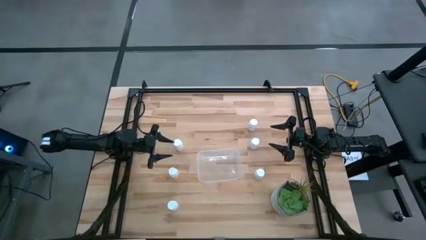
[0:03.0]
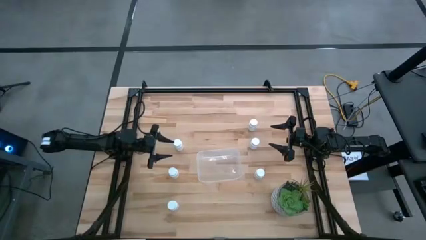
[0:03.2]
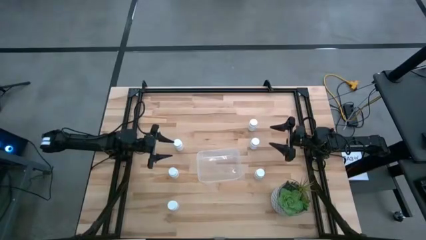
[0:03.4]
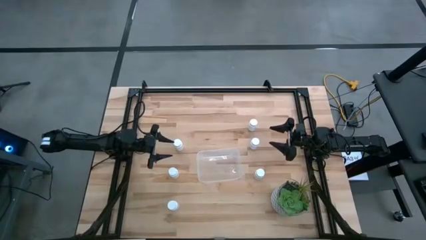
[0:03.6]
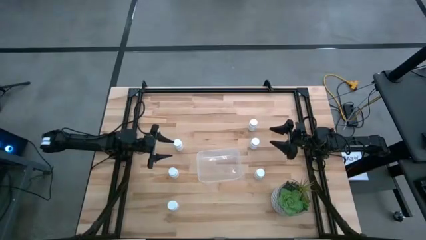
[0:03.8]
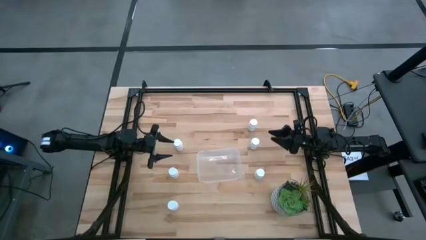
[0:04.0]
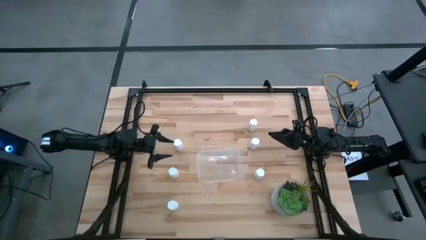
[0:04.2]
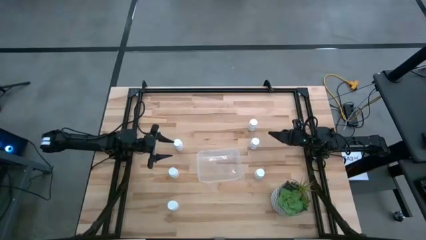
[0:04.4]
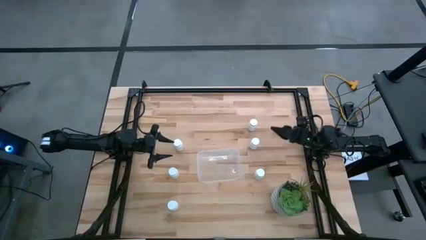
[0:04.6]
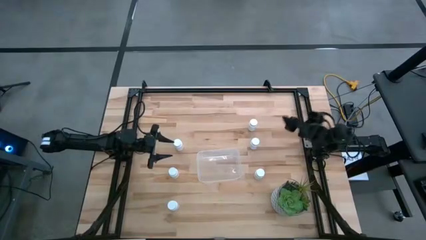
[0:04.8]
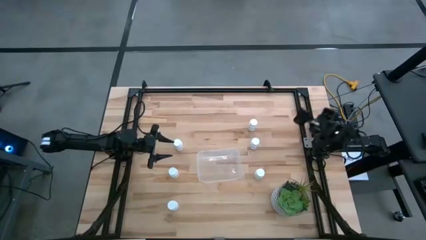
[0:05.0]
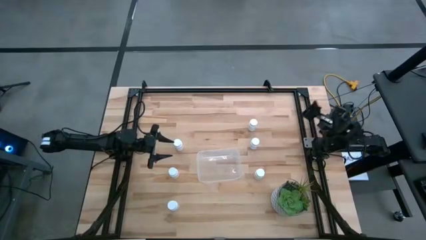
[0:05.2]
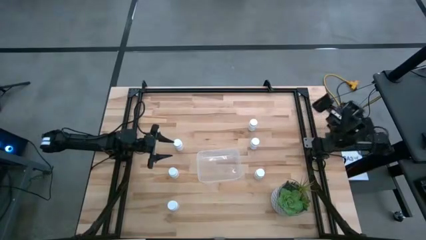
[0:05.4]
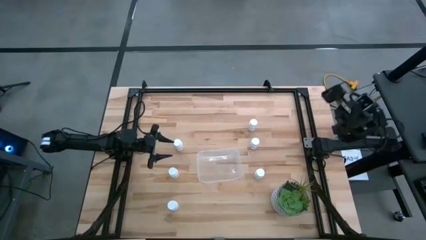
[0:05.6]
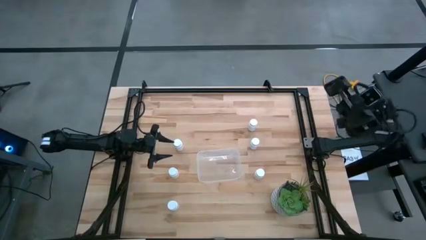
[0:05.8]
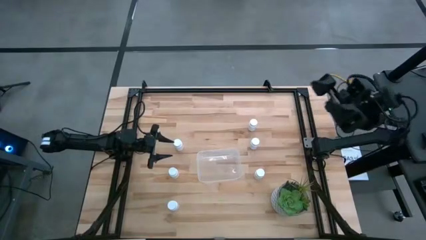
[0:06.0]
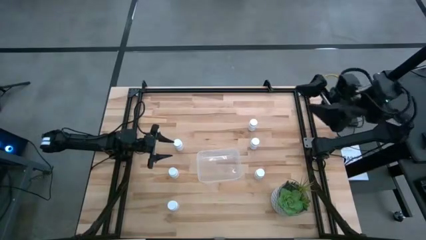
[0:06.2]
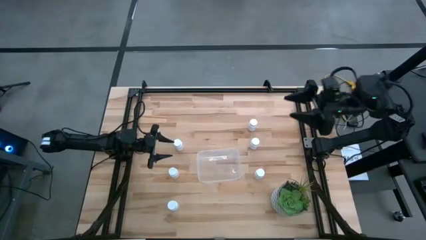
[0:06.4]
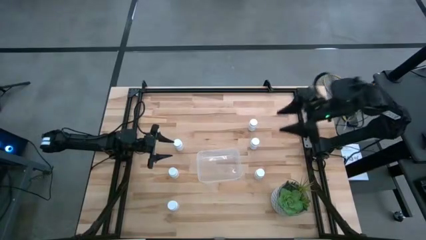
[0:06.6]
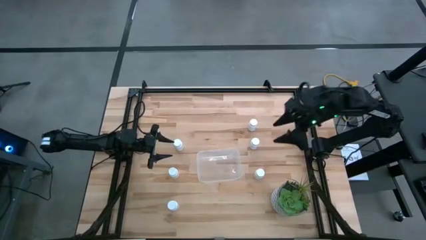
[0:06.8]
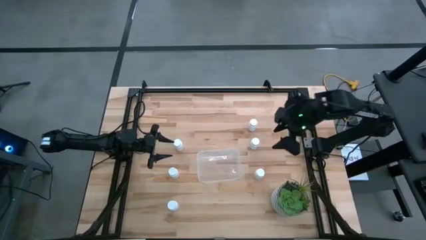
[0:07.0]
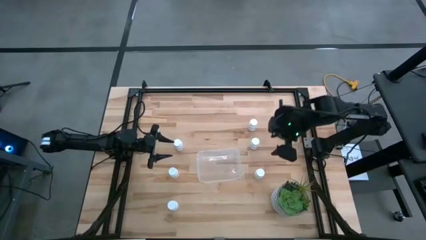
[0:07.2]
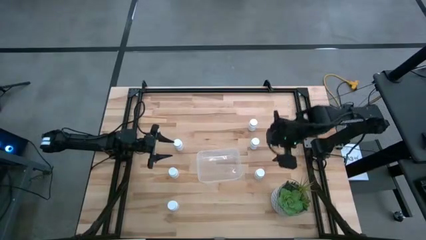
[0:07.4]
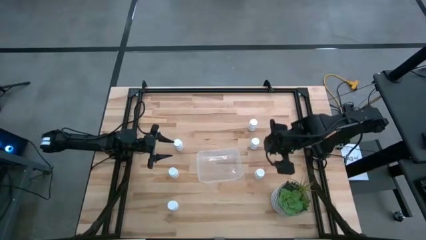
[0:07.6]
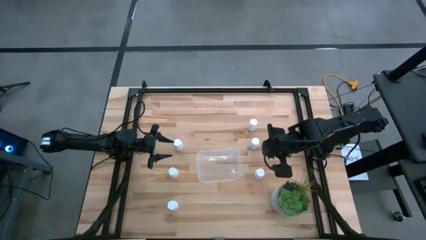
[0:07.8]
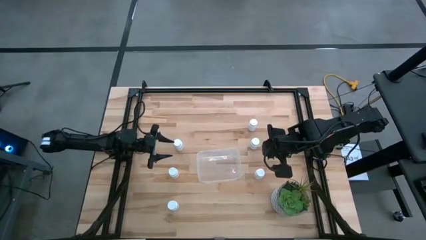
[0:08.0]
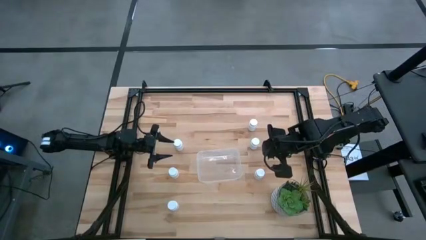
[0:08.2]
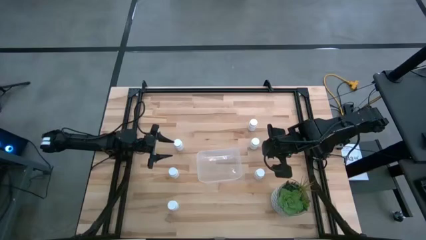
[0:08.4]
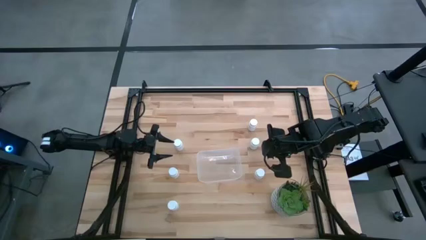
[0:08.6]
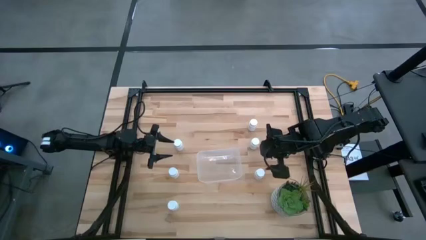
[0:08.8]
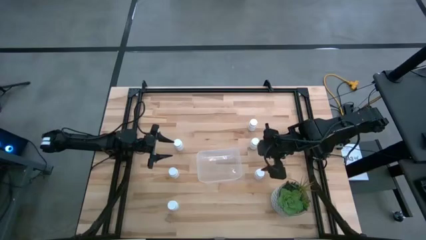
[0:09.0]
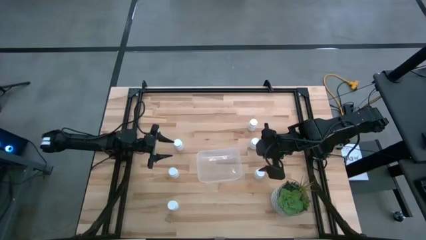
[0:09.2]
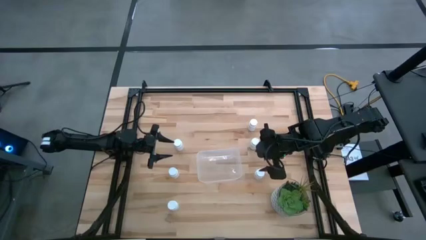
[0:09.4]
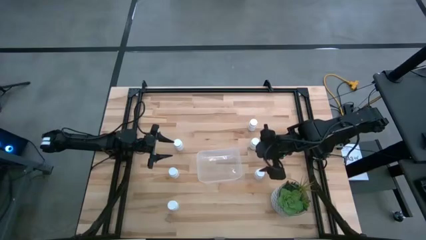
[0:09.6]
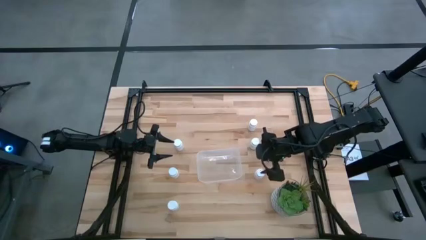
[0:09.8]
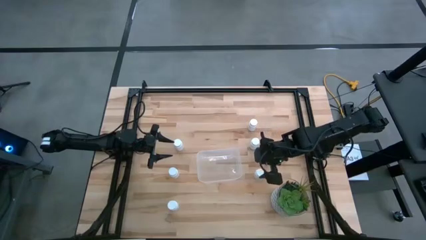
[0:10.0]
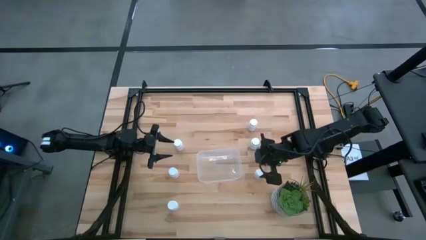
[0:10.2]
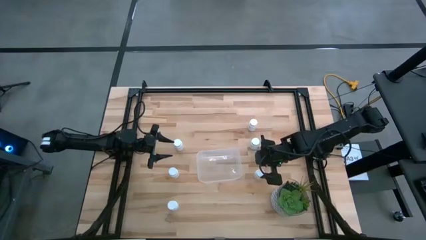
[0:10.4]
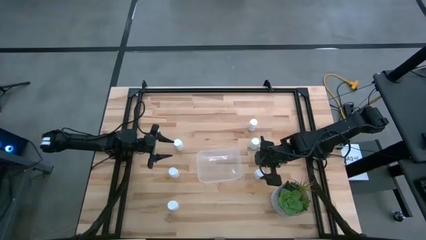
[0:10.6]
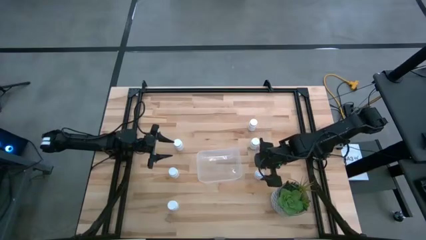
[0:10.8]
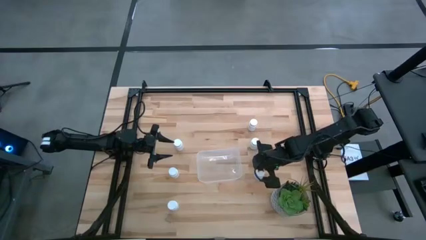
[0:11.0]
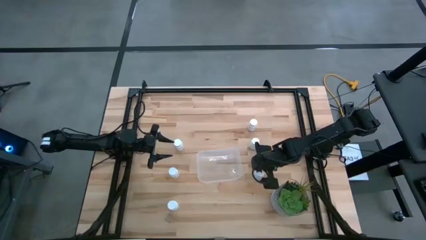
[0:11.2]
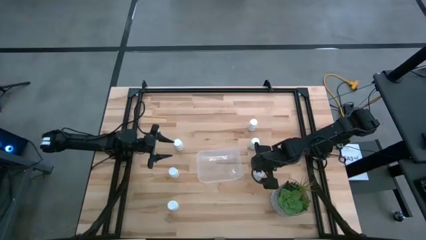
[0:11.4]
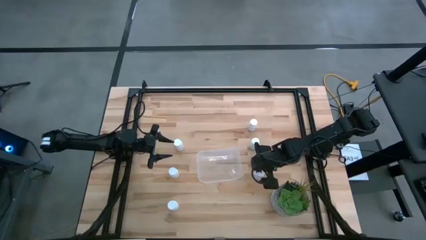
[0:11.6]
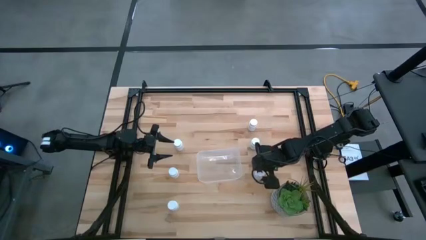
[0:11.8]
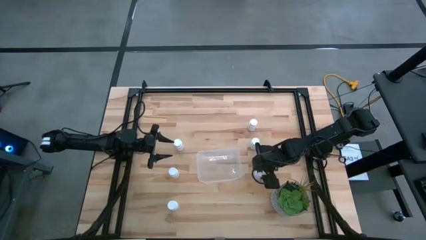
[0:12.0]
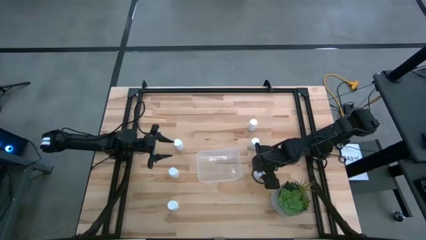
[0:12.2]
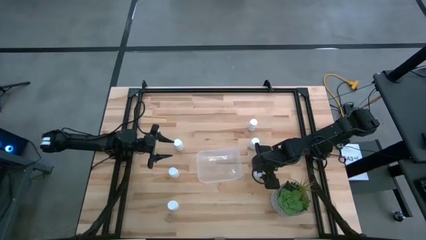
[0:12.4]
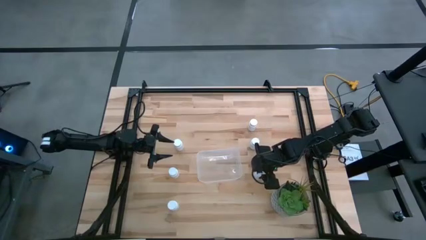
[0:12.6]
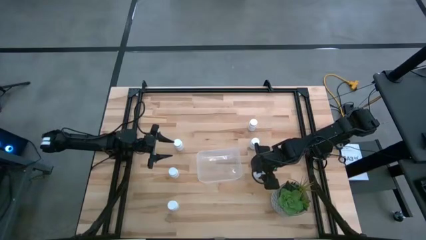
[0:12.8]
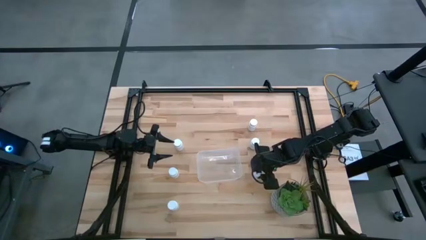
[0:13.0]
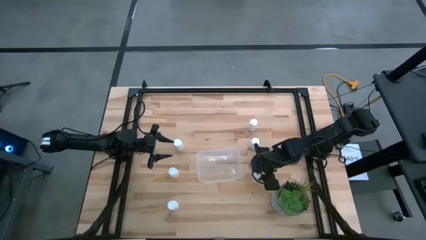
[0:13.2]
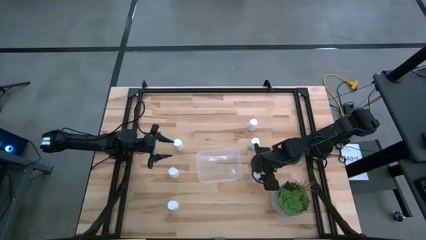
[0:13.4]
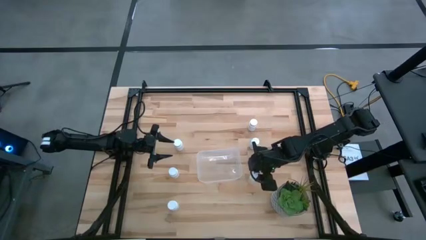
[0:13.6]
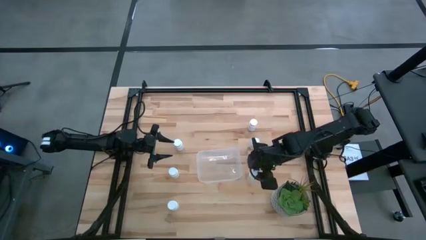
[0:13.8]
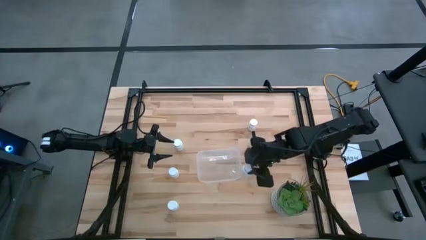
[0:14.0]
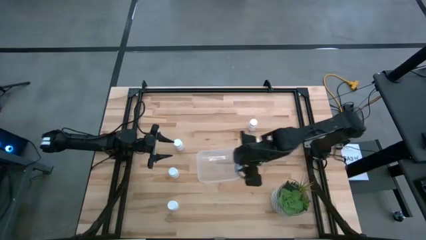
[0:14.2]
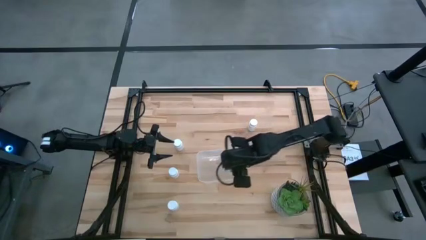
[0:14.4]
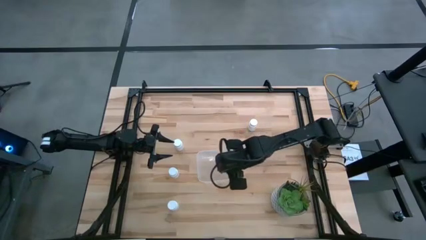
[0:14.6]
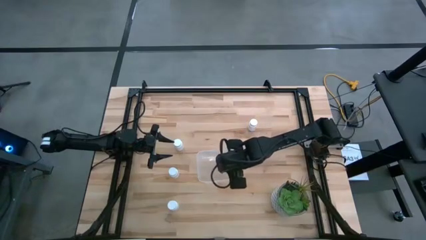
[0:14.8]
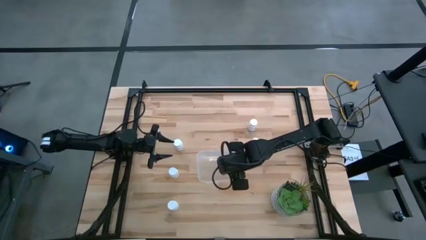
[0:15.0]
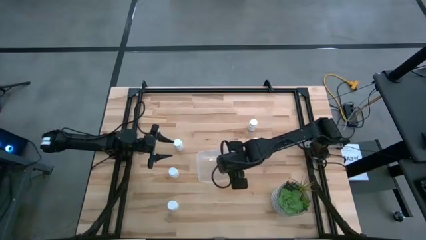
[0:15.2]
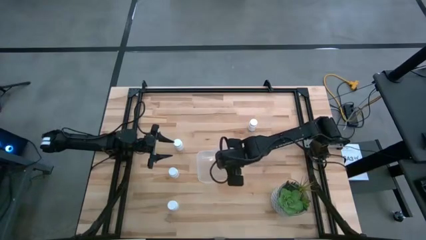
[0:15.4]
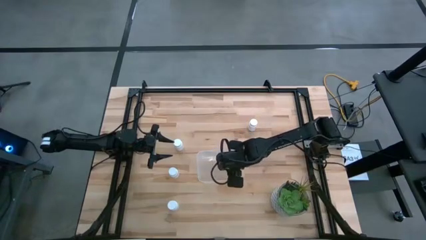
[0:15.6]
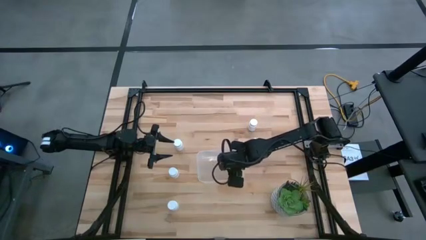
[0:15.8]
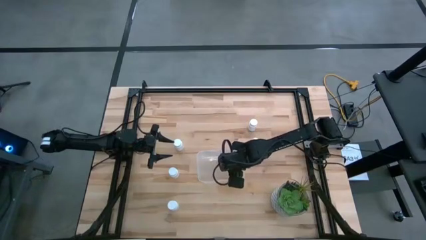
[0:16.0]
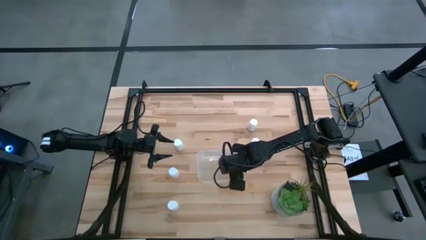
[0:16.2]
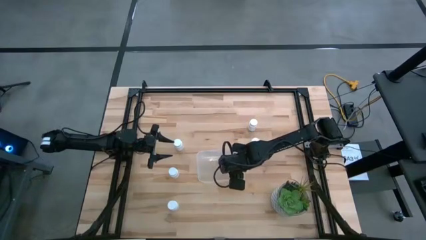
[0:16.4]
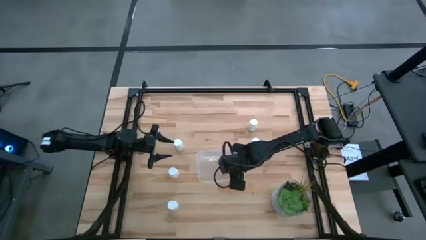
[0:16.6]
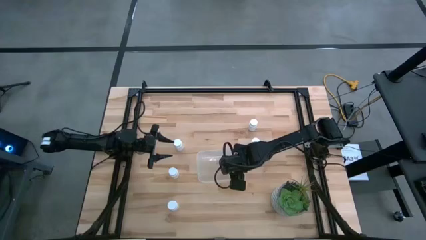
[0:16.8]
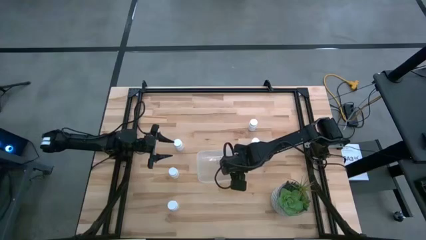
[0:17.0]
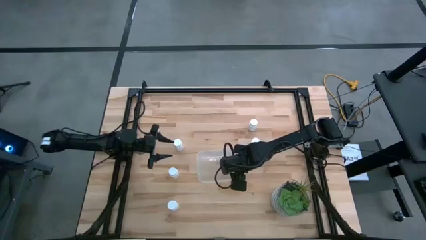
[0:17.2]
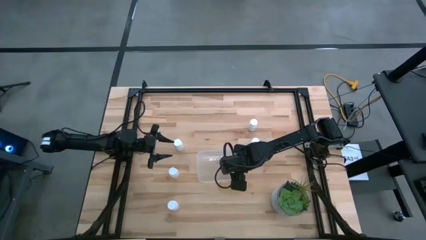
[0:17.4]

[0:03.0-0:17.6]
Task: Pick and place pill bottles into a basket
Put the white medicine bottle into the transparent bin
